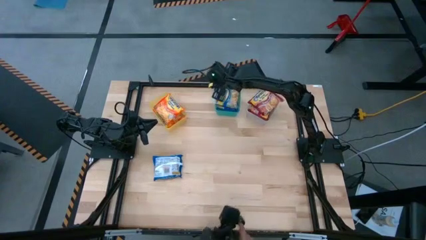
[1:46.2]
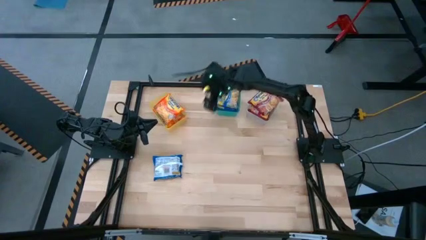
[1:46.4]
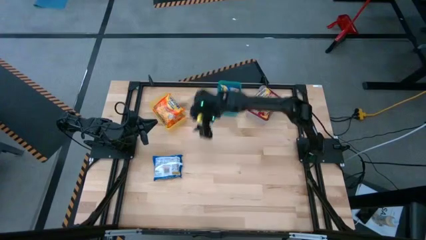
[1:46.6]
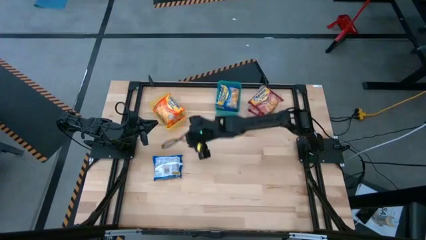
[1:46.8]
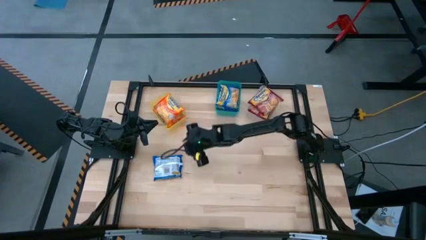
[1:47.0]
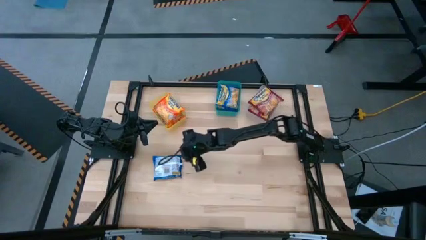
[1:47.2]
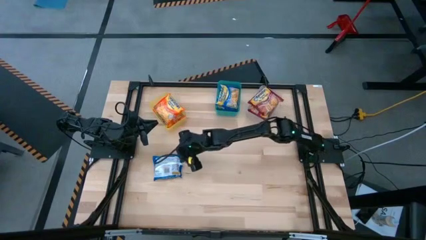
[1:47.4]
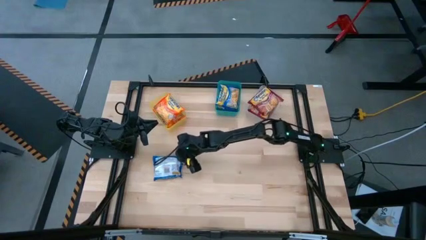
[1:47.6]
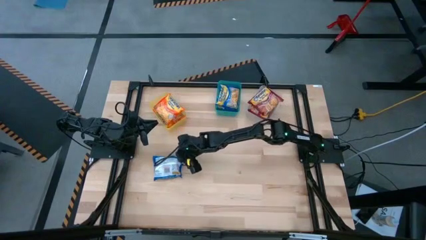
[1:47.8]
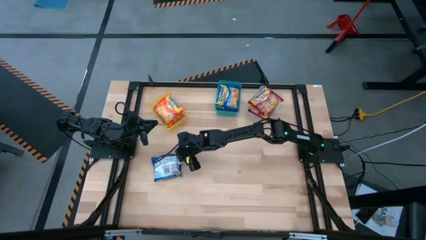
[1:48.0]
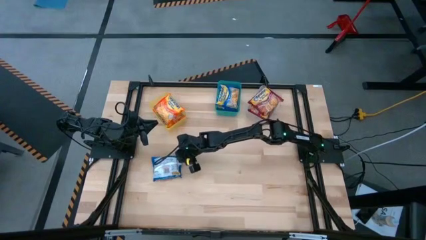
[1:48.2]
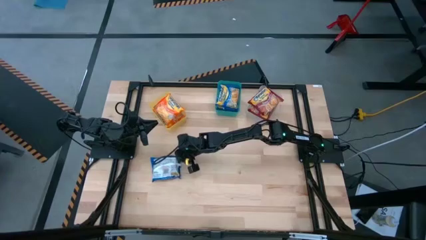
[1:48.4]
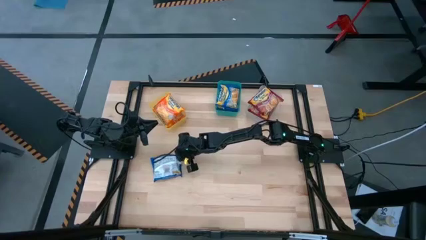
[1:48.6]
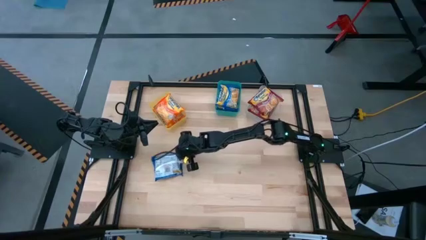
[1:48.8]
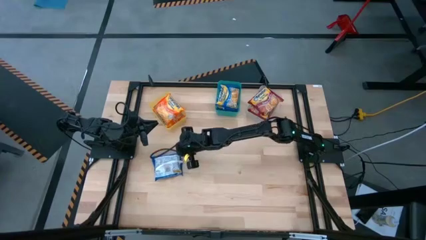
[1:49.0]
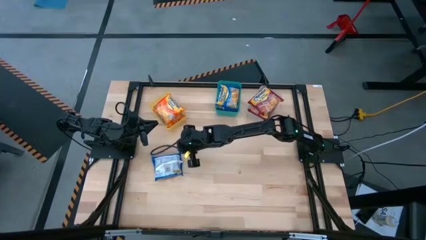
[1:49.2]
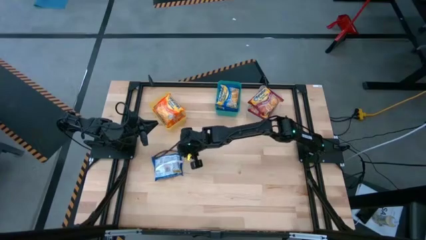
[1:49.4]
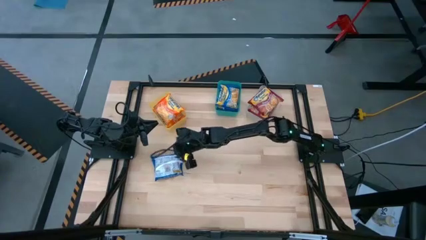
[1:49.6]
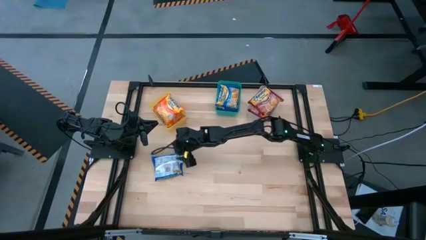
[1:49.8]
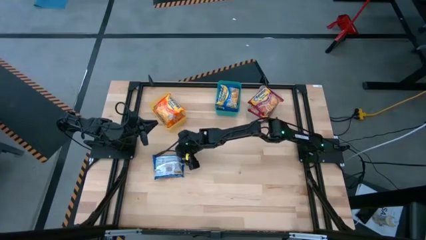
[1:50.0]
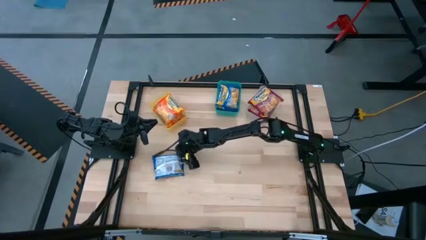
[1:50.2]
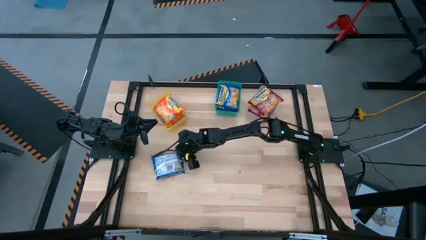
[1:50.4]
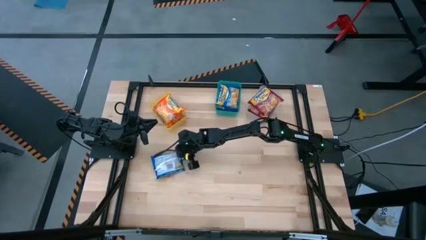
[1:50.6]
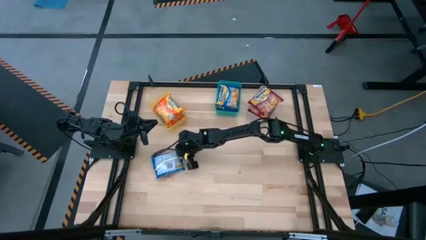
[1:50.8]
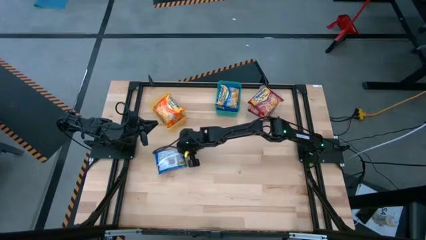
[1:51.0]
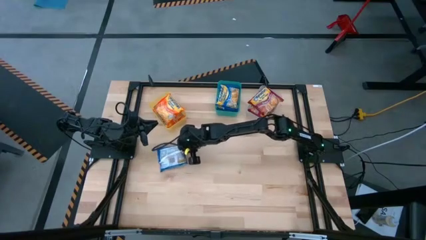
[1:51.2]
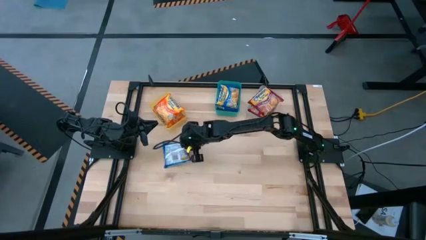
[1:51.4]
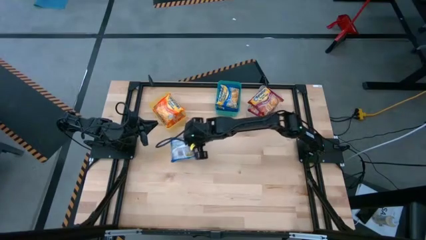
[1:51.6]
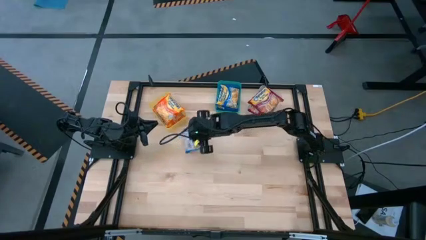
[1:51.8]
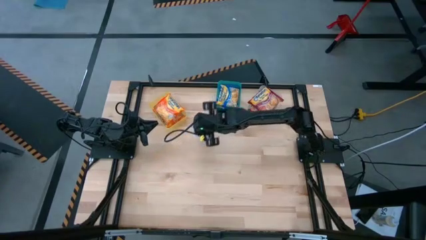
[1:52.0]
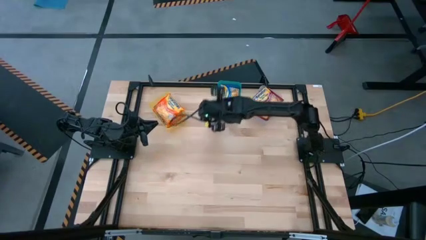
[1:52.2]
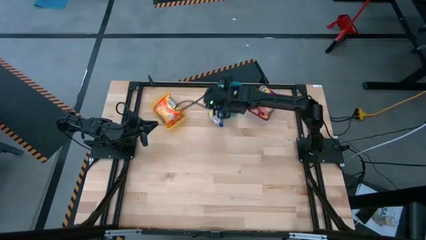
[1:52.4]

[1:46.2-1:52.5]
Task: Sort Maruchan noodles
Put the blue noodle pack into the green bin

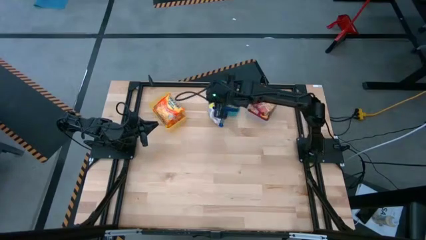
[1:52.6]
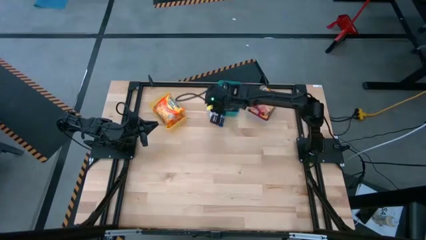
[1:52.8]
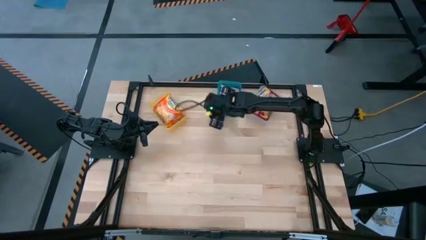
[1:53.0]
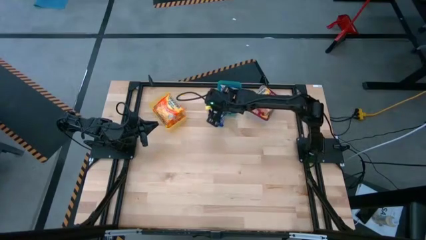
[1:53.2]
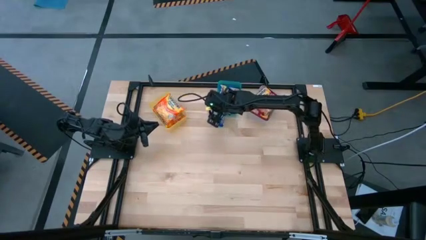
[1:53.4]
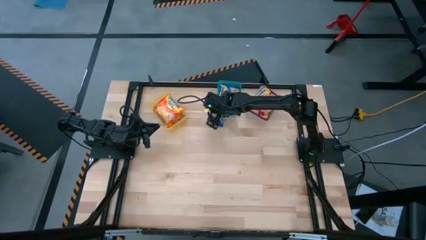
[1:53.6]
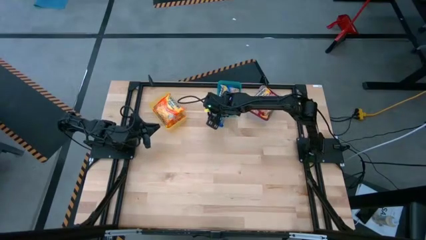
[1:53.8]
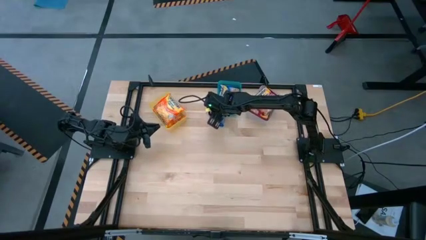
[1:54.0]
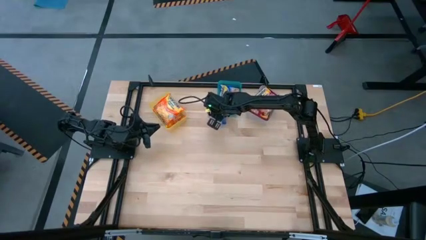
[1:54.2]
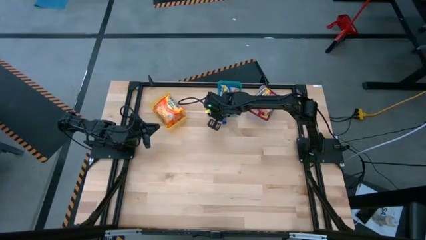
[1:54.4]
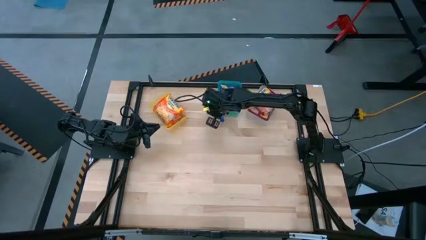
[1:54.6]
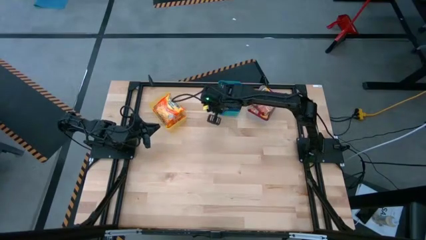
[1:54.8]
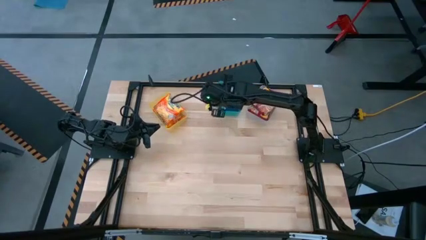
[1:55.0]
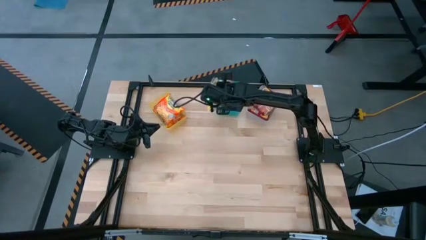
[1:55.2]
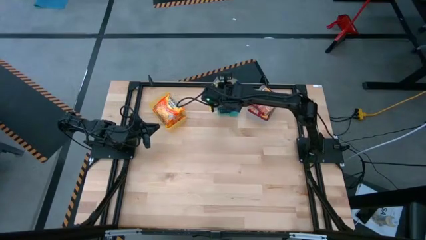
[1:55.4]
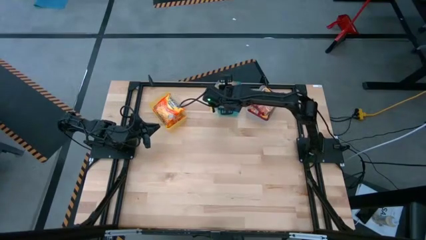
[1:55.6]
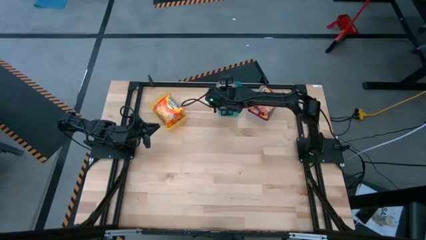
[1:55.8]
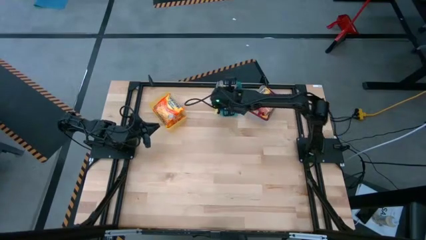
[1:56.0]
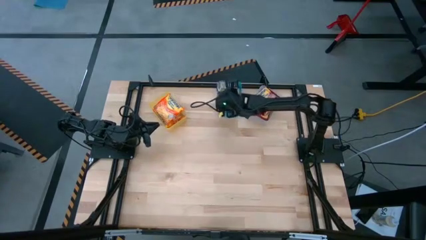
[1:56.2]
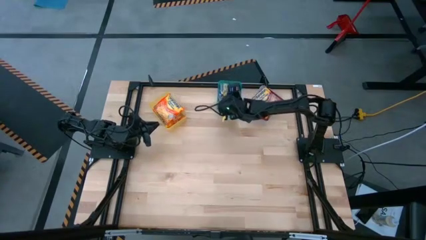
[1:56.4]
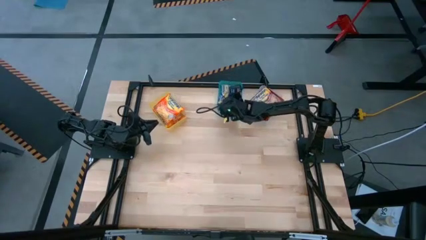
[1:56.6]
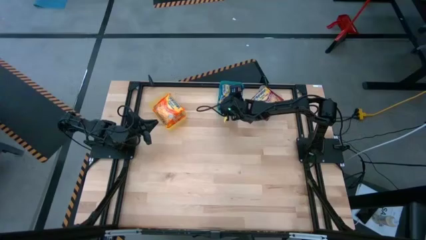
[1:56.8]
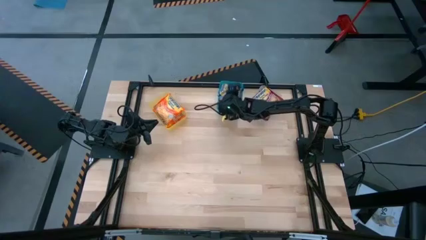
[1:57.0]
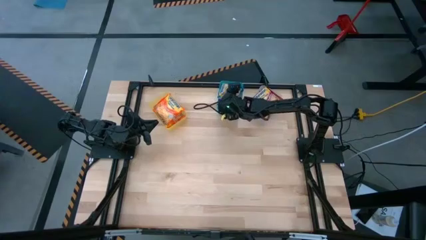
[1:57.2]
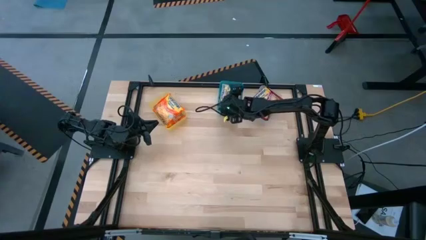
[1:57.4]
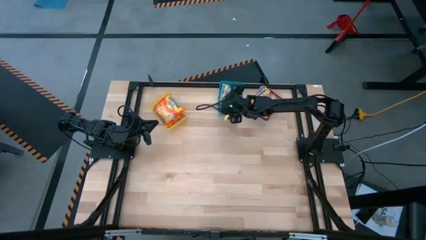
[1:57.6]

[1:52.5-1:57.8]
Put the blue noodle pack into the green bin

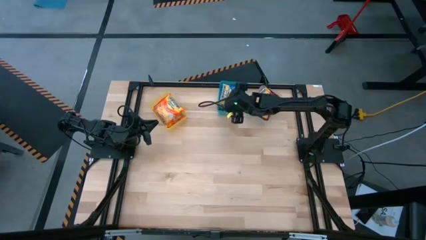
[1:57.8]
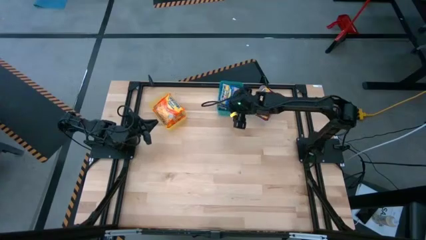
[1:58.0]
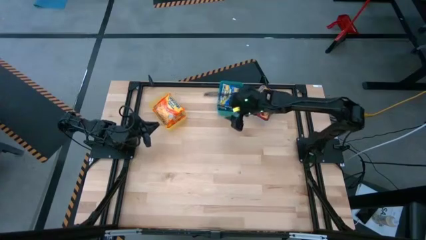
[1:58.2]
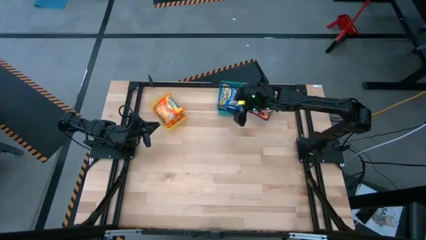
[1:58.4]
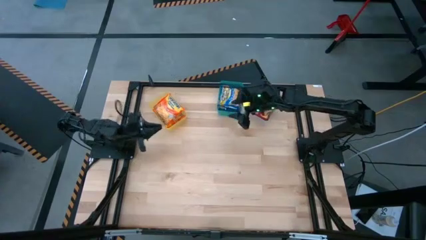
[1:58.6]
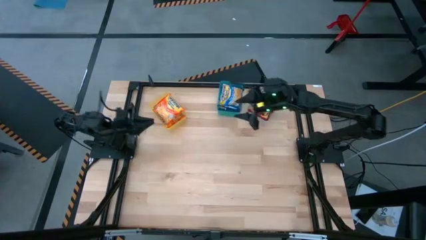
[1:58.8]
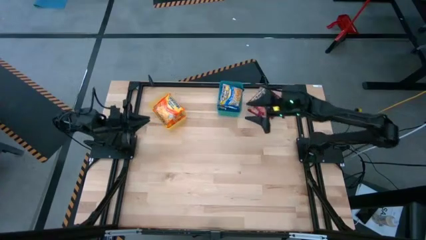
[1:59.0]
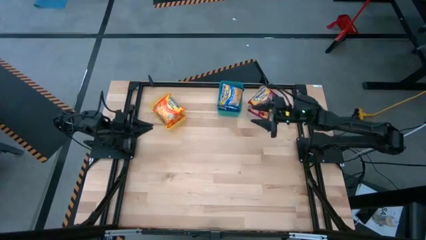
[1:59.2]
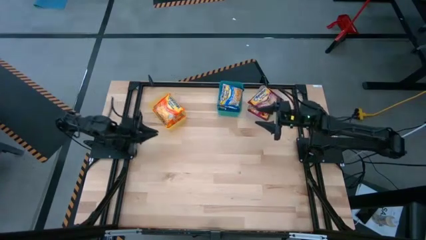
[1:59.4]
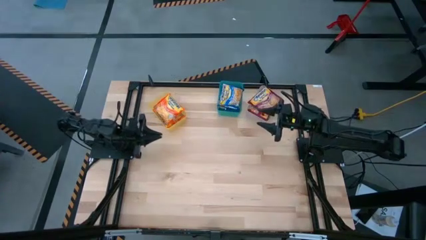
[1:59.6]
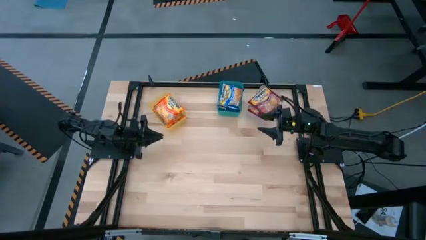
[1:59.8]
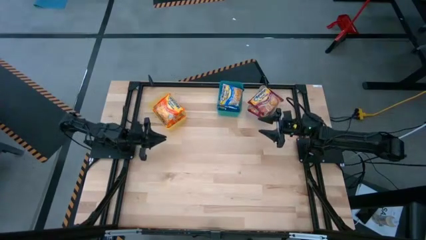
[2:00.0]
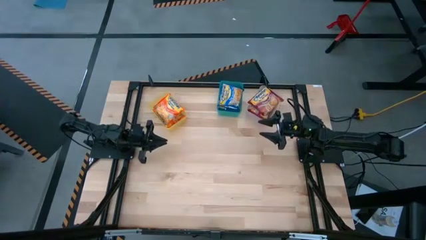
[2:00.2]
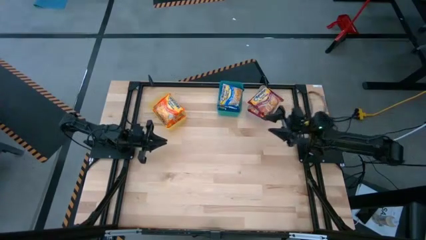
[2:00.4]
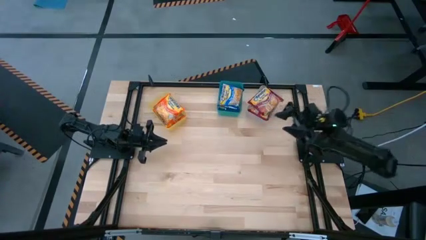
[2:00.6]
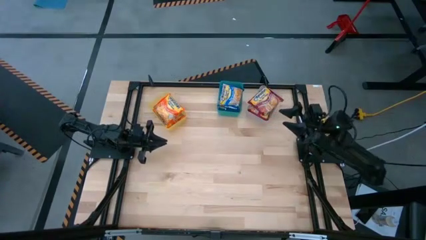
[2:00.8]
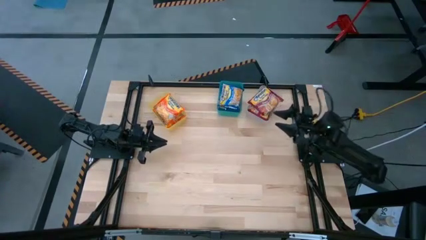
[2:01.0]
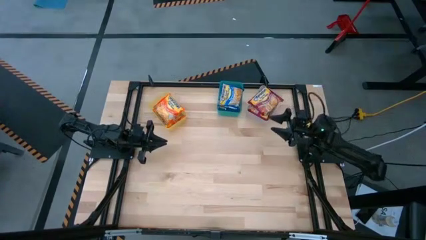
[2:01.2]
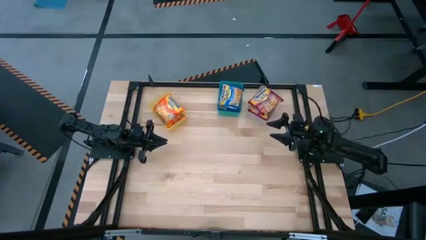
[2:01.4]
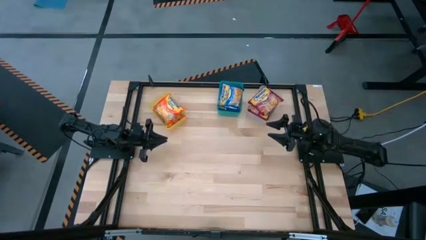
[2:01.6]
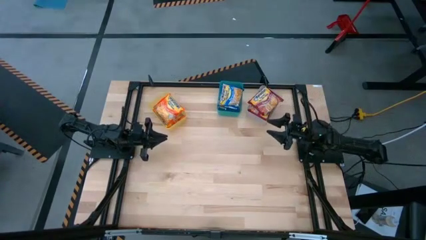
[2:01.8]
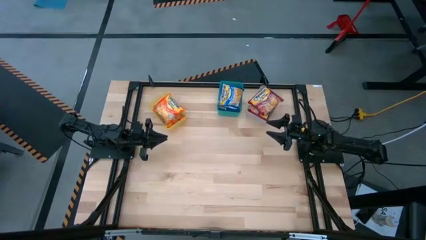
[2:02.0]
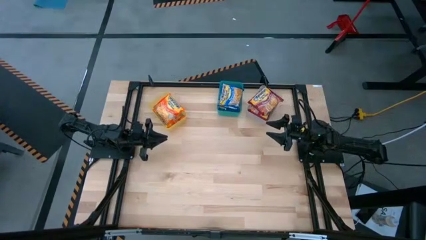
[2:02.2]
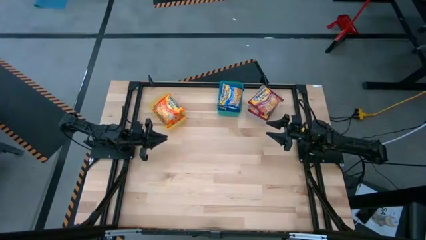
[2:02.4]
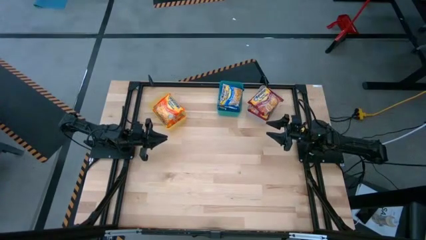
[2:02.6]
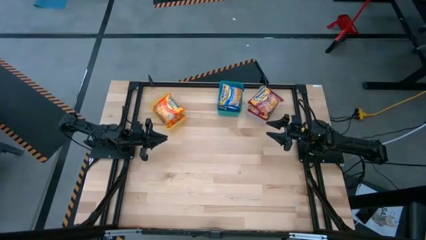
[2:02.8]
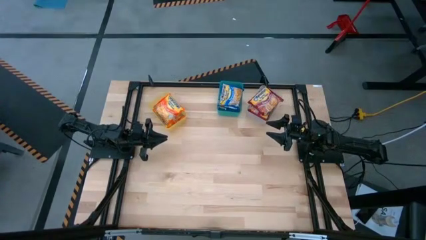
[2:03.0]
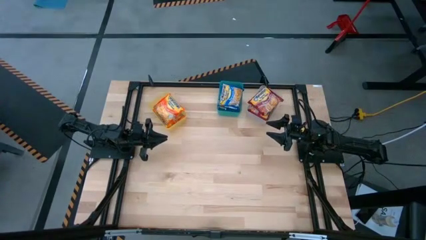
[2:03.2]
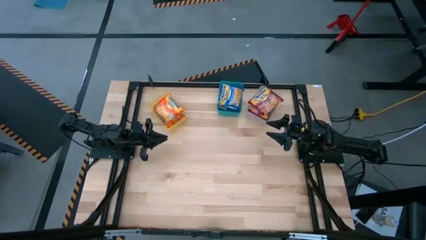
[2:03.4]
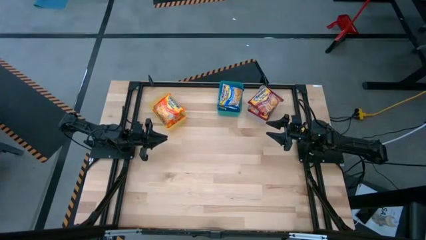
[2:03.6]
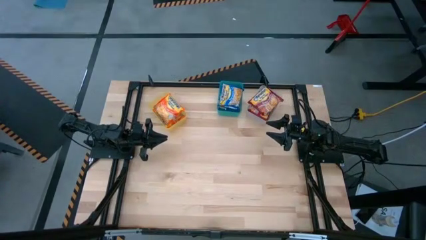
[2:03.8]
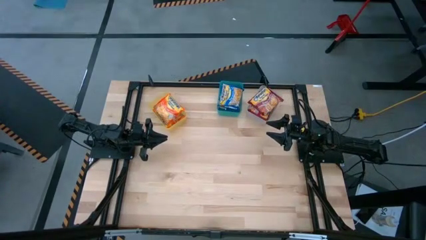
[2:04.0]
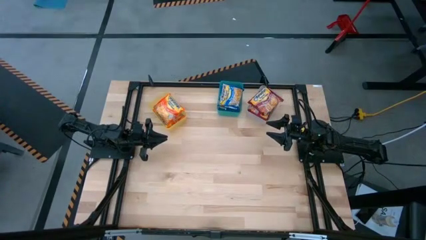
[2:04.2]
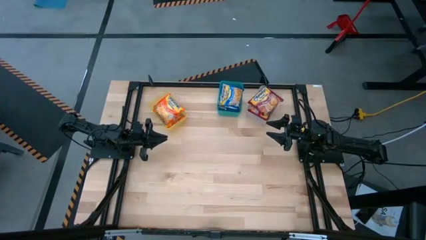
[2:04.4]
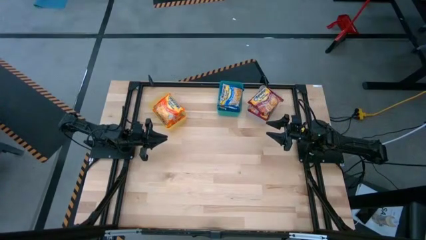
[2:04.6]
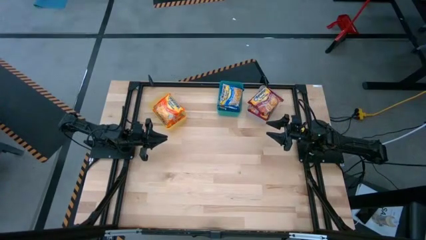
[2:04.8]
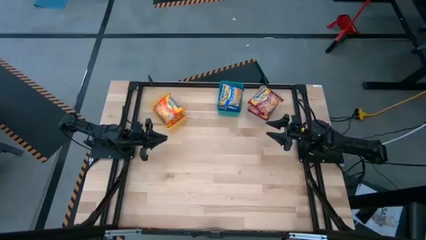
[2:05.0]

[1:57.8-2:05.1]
Return to Home Position
